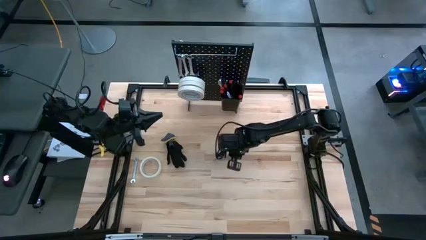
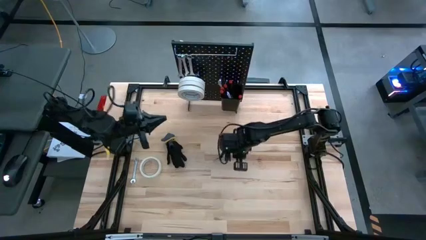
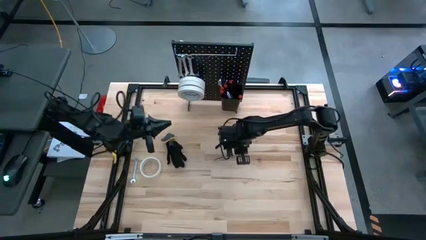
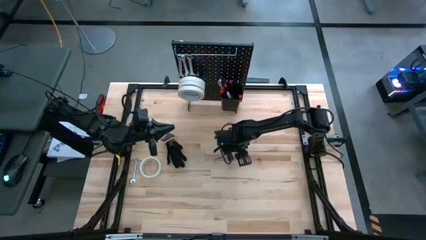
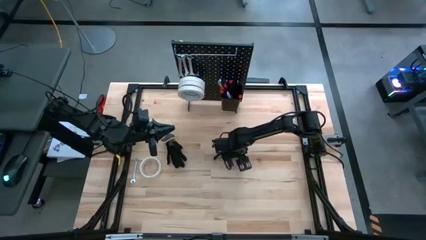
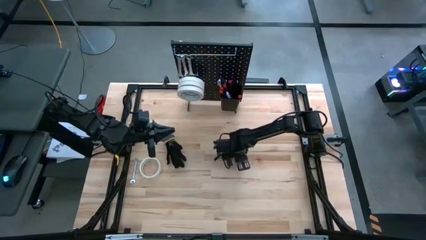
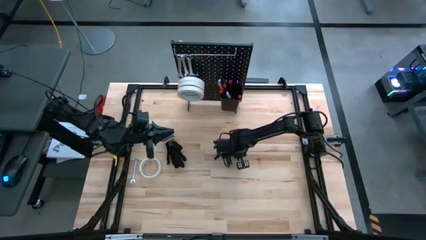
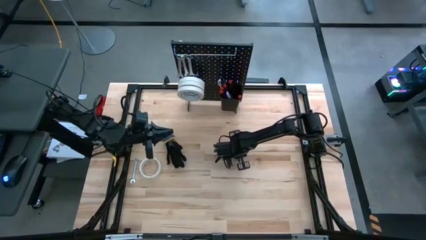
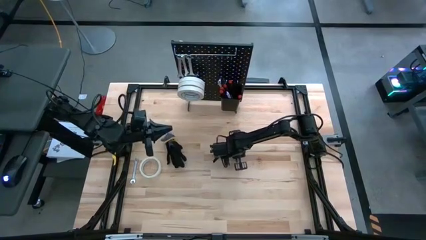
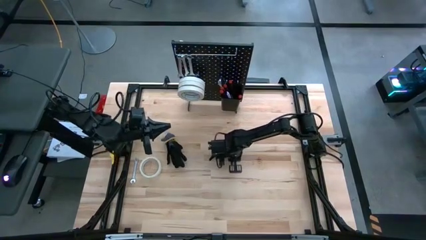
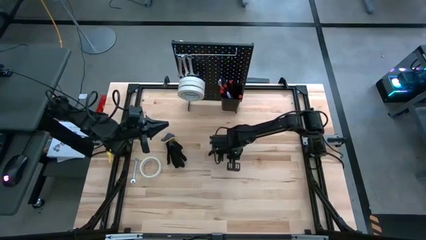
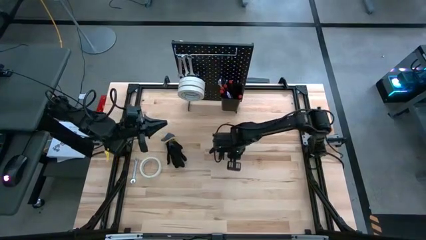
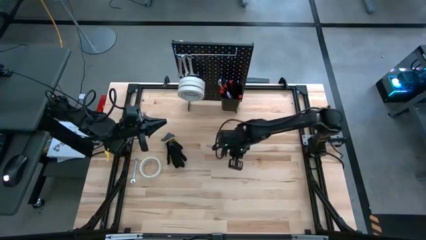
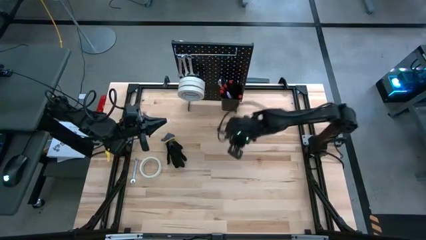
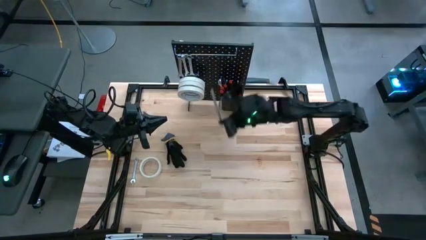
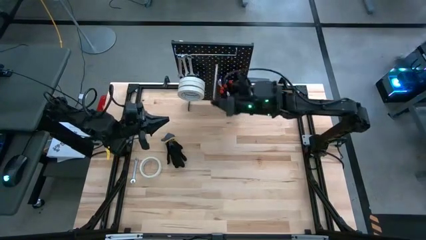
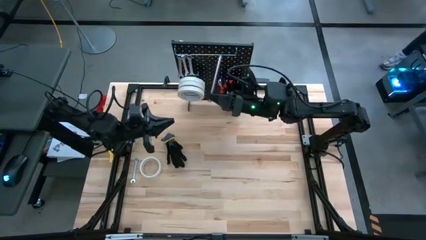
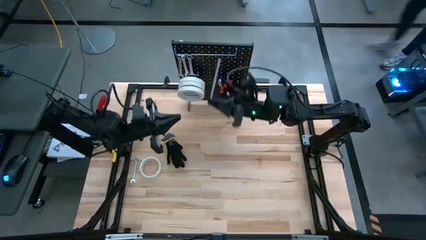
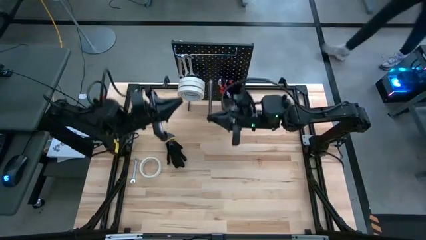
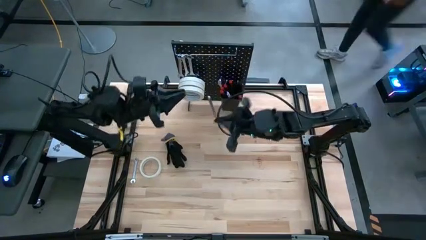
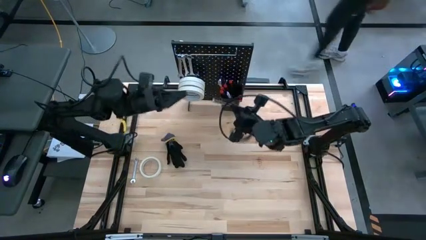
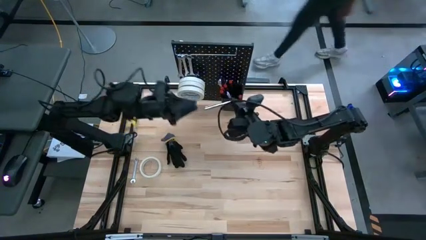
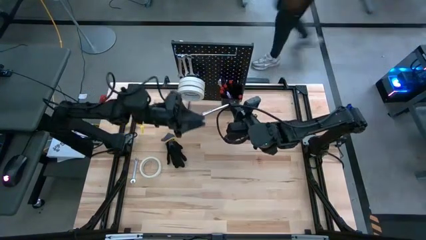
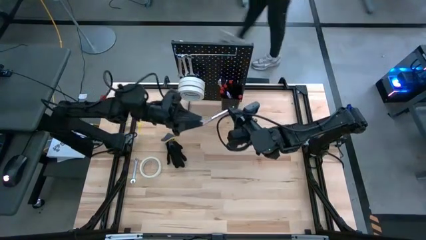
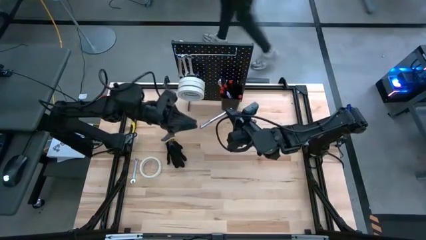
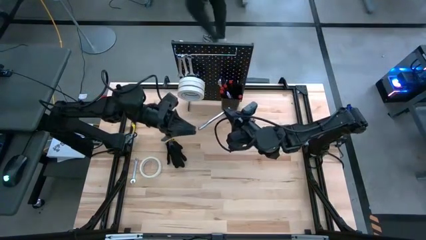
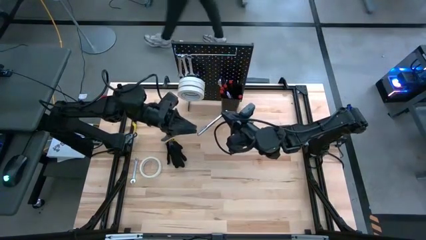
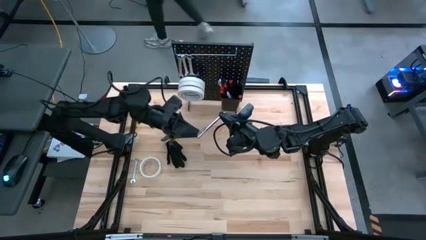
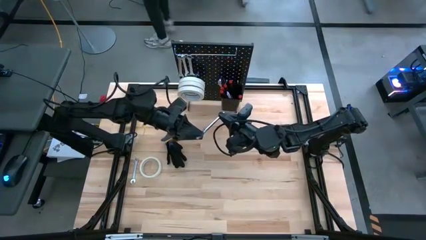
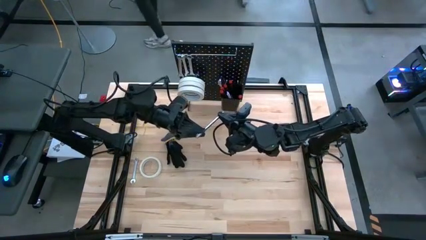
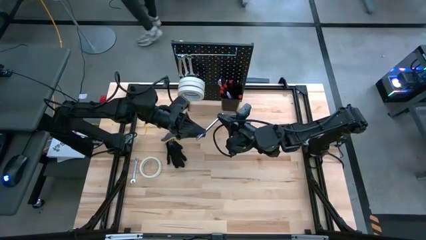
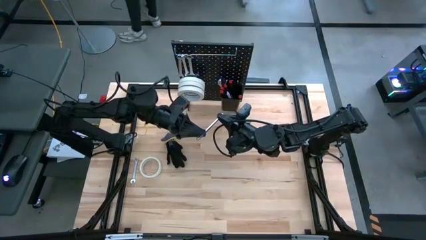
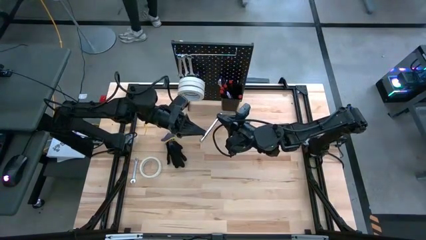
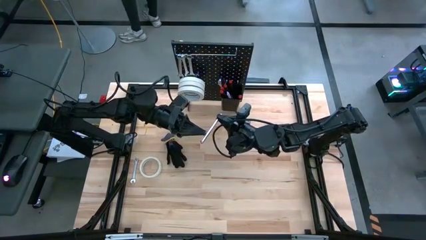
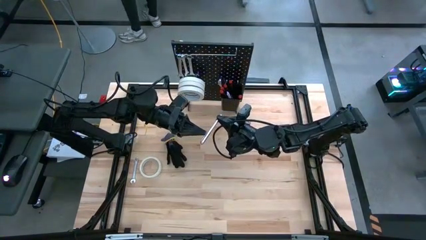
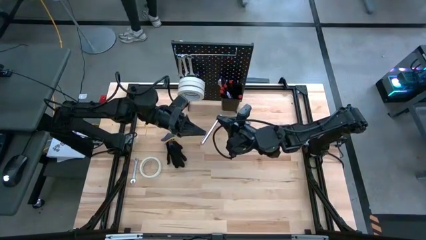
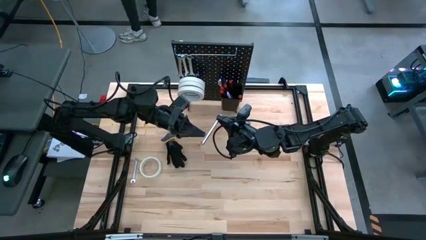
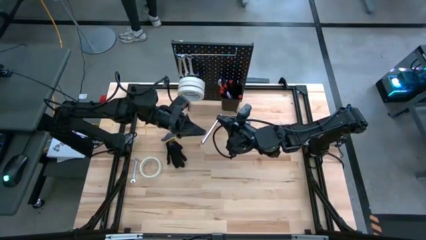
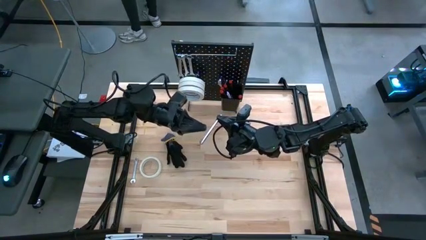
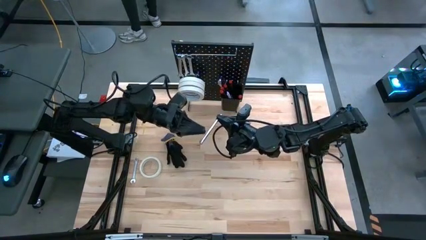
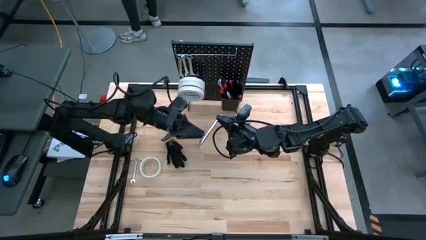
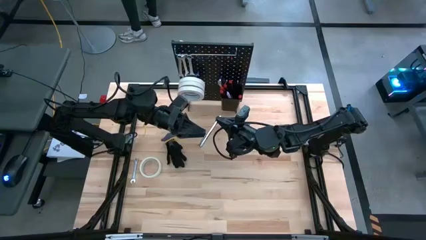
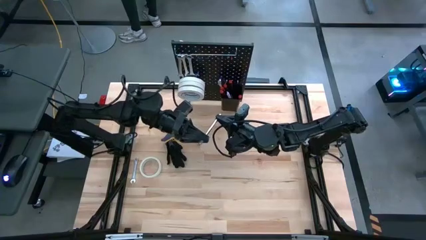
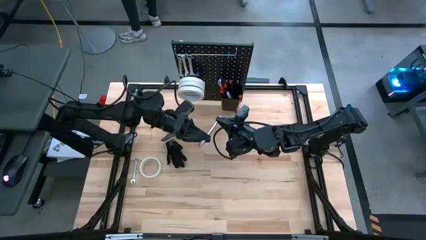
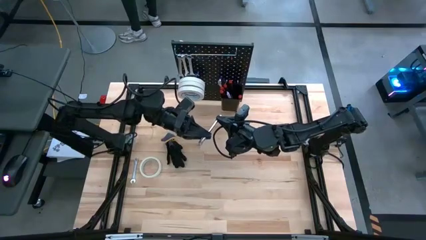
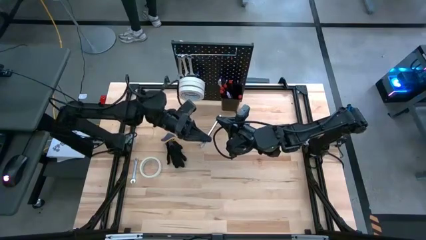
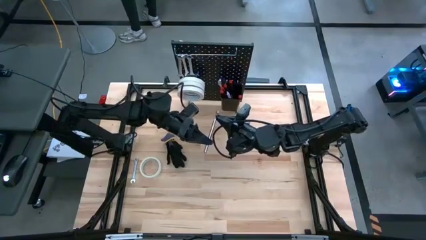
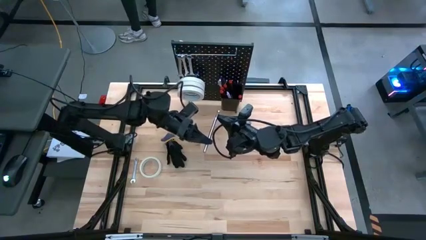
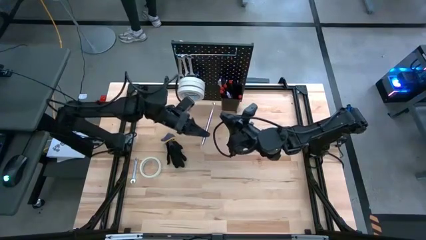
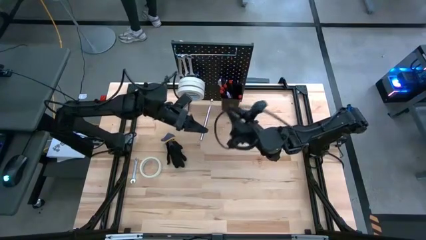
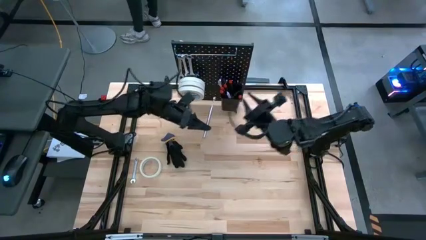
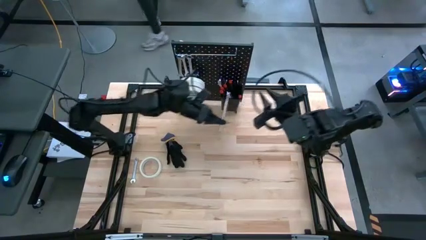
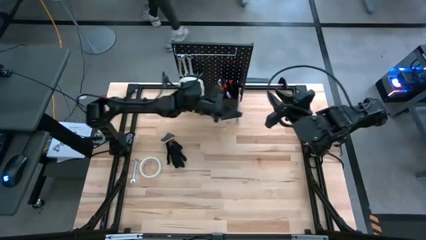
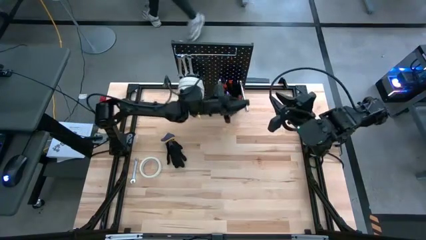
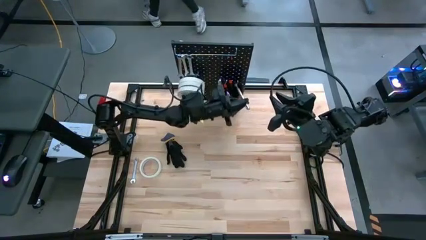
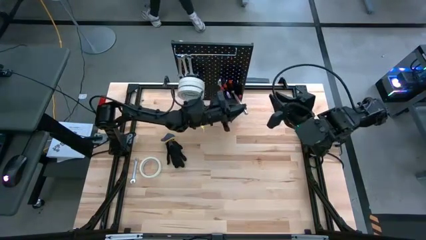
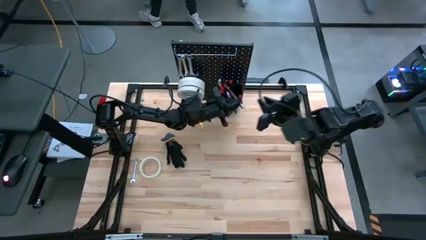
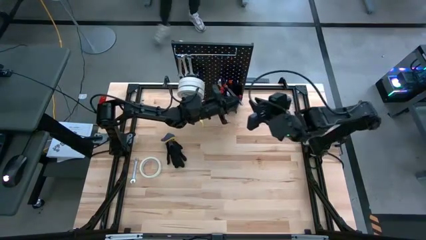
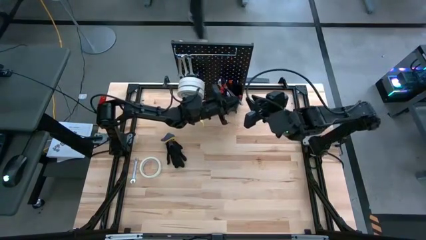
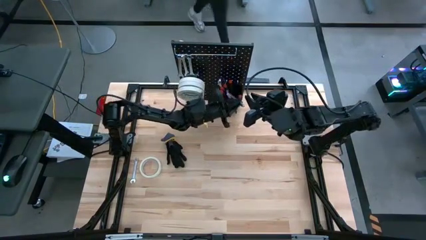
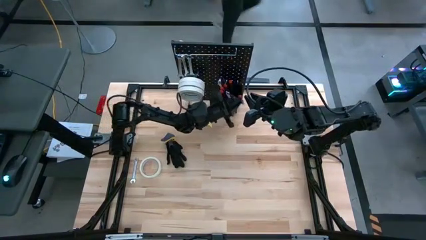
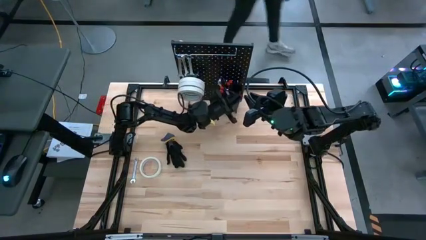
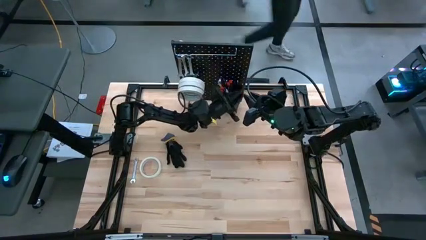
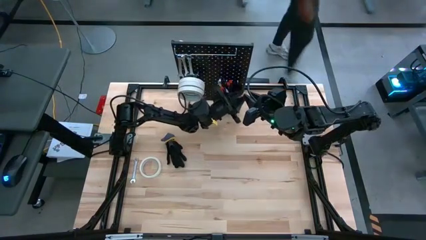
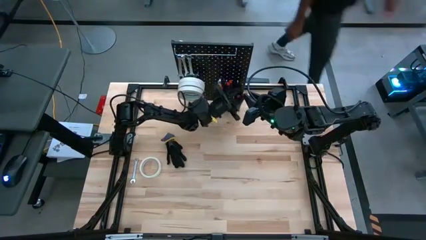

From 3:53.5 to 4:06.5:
Task: Hang tools onto peg board
Put the magnetic telescoping into the black bin on the peg board

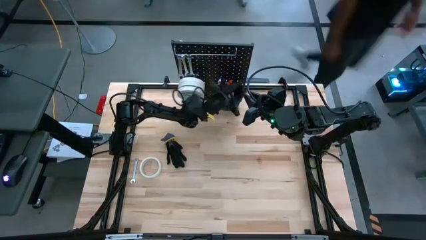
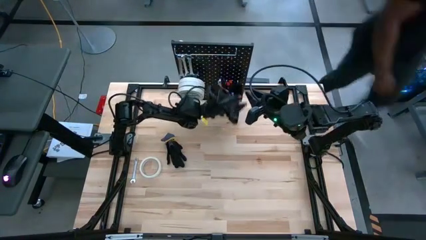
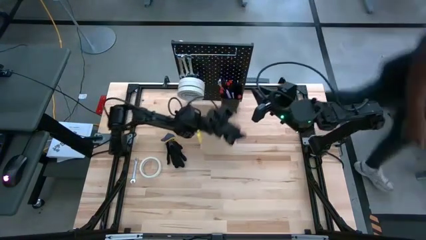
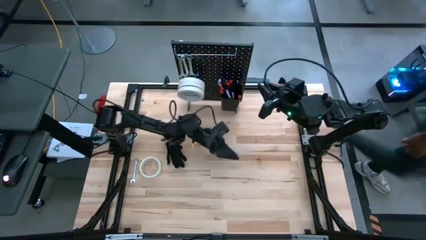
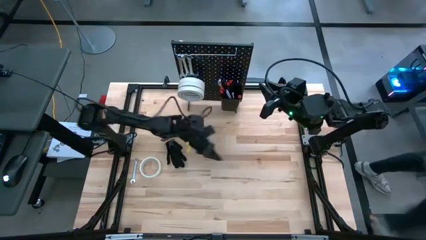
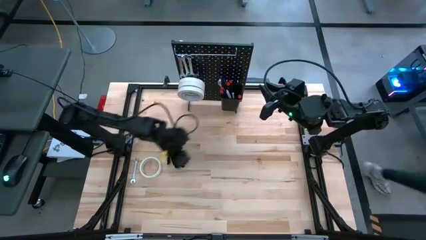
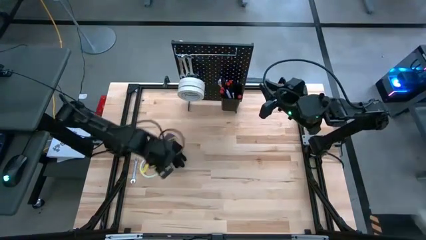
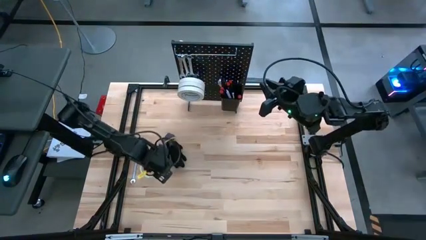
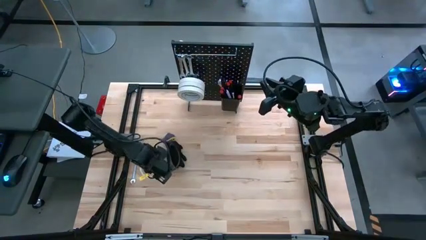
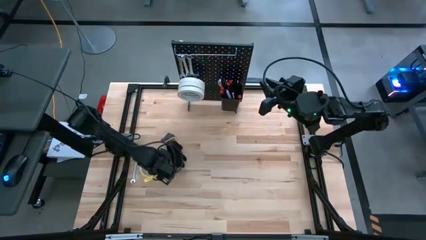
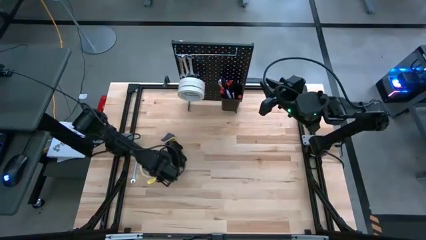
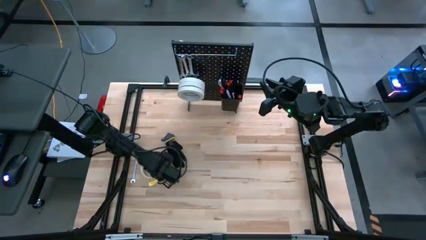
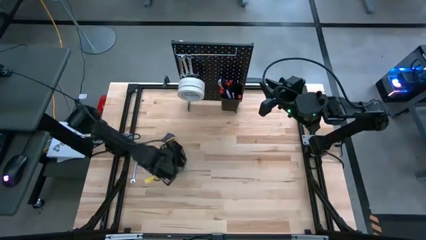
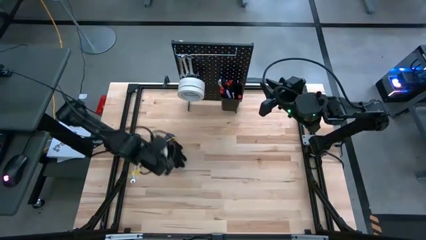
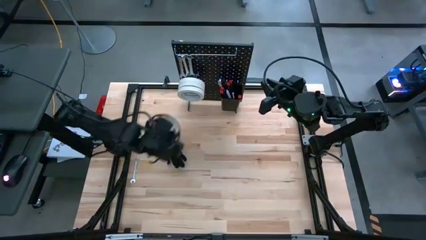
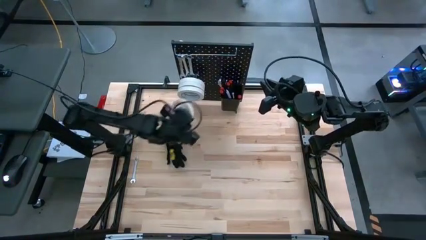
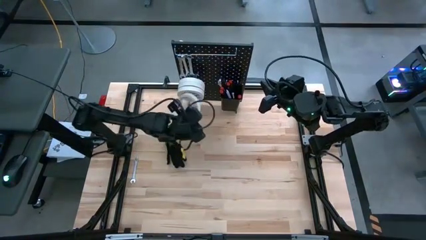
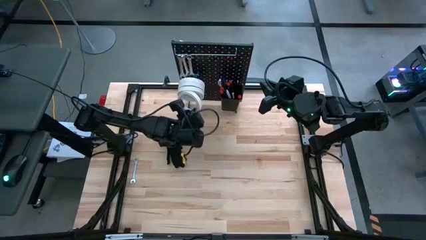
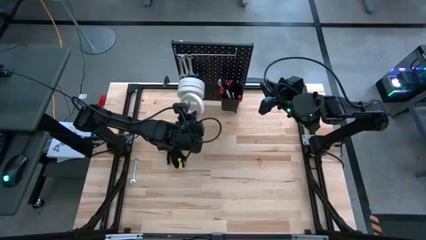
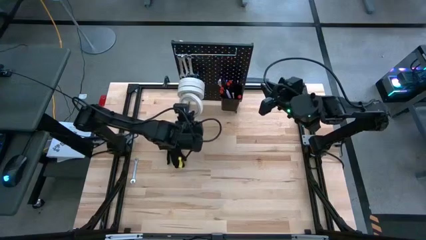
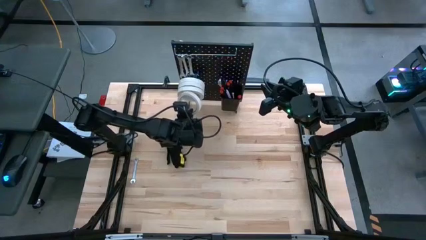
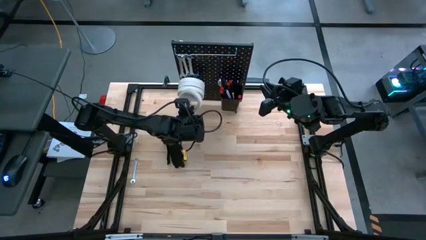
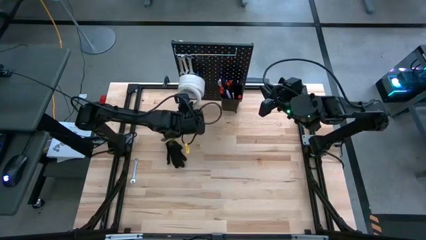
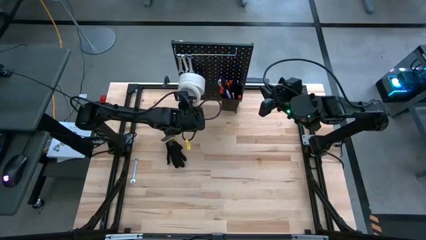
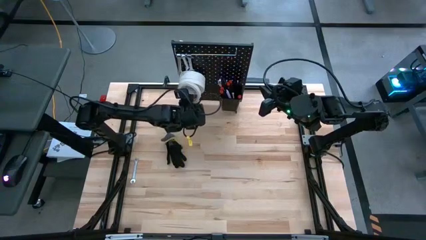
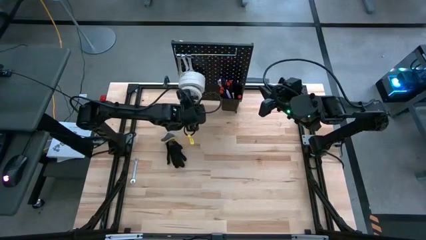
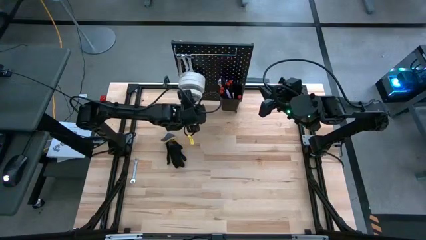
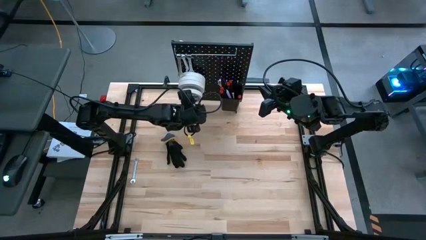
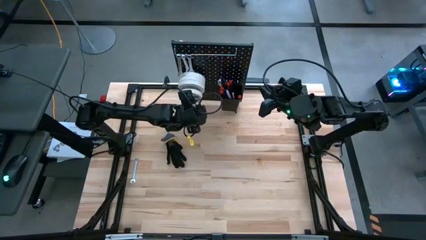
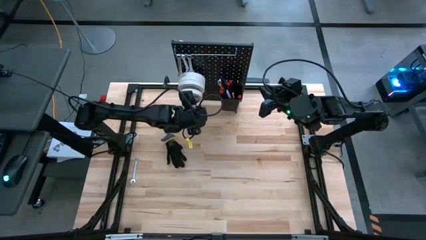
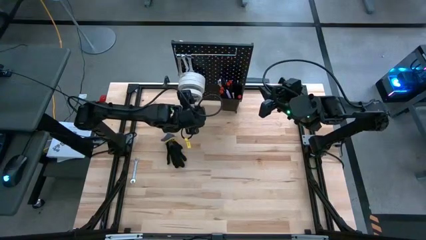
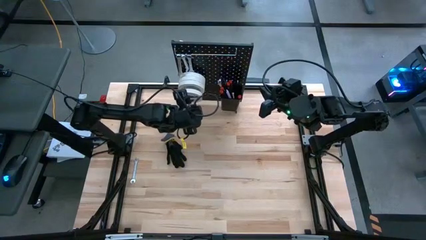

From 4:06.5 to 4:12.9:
Hang the left bottom tape on the peg board
